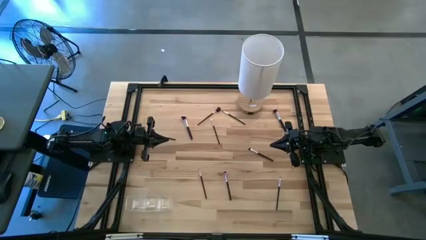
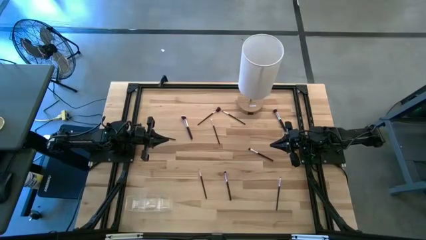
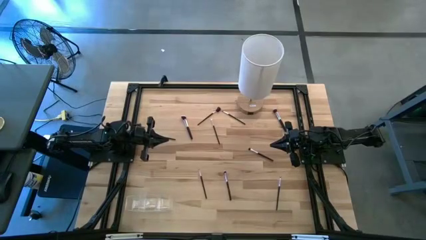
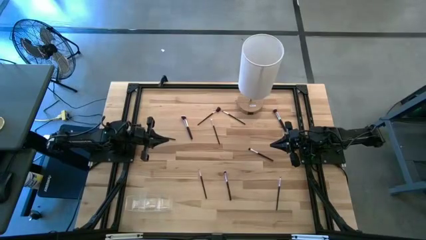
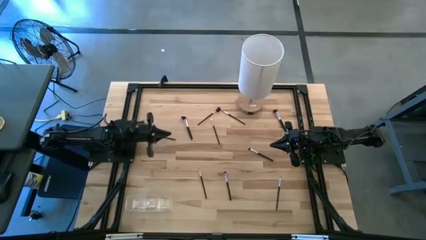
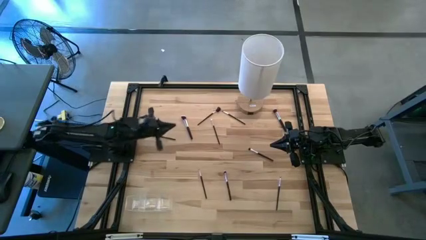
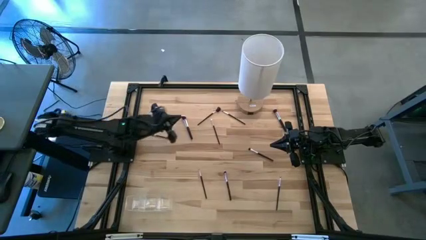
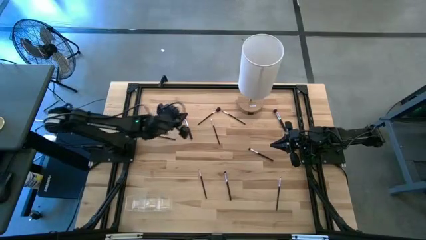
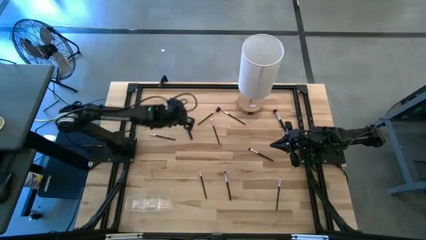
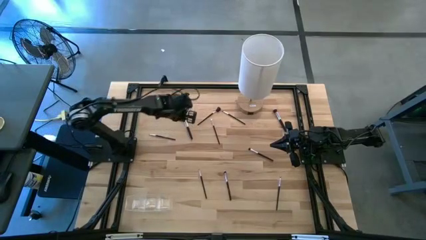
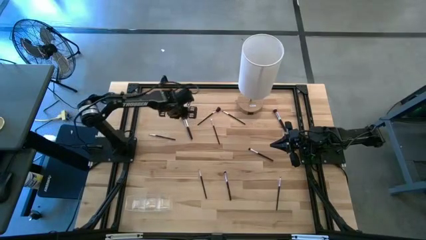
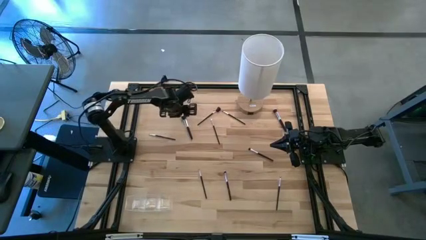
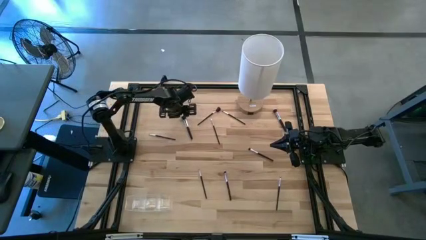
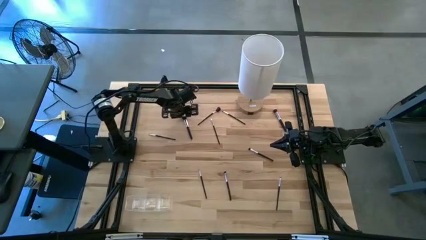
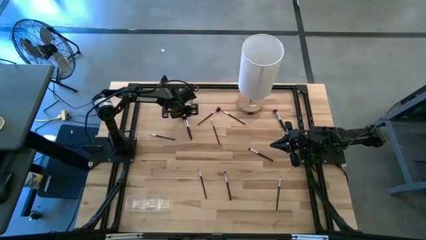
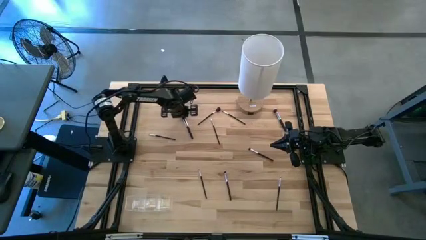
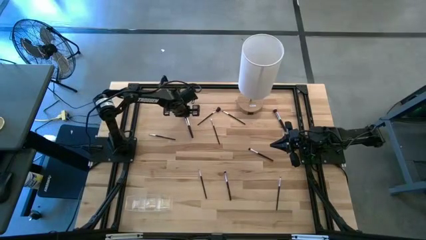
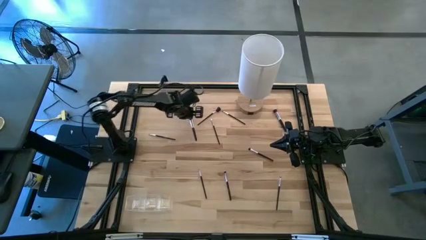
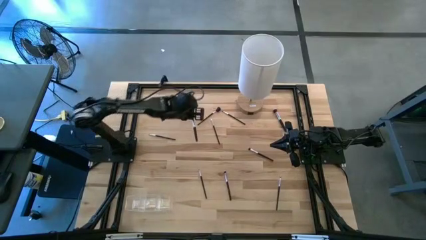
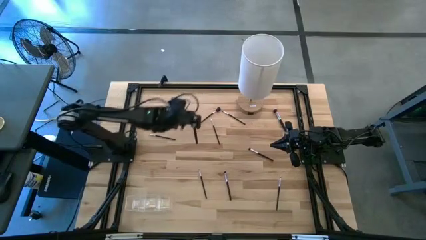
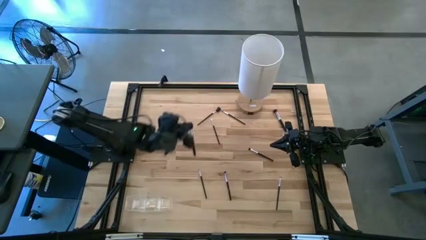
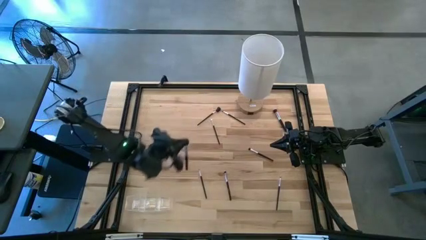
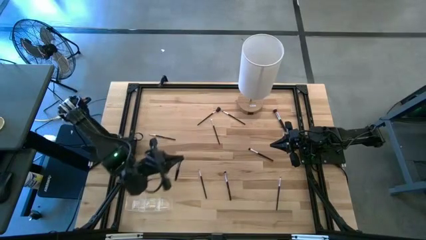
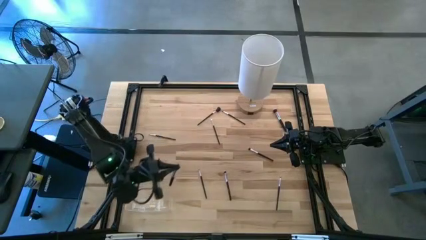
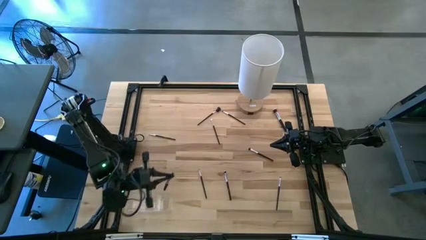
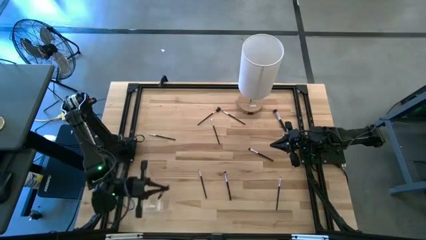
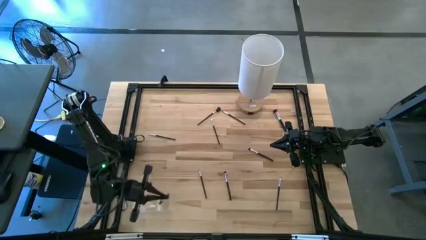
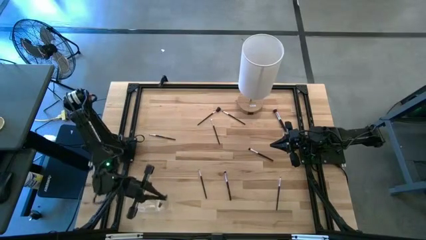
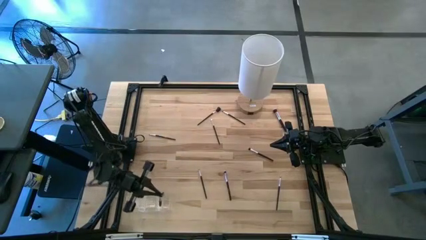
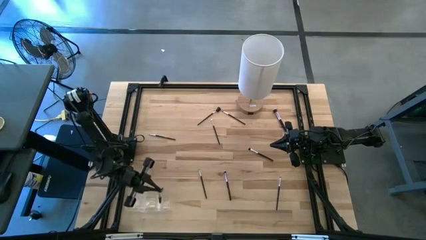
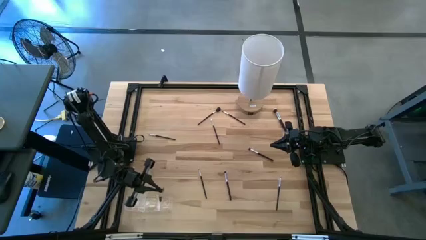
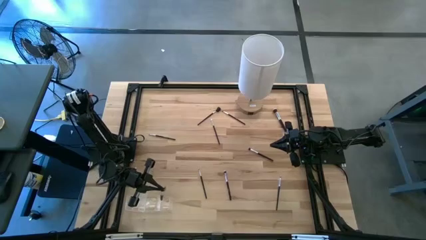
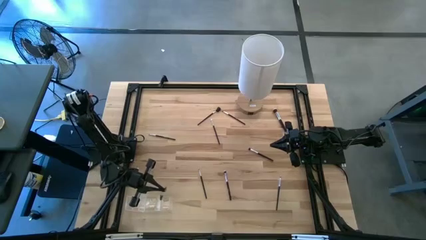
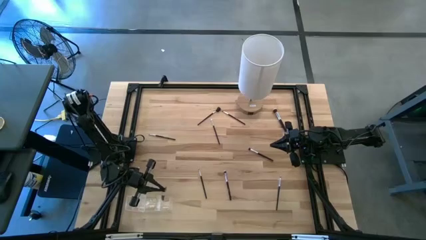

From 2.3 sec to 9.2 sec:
Task: Put items in baskets/containers
Put the black foundation brush into the transparent organizer

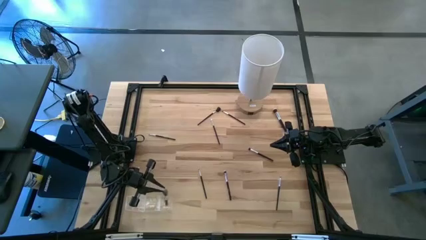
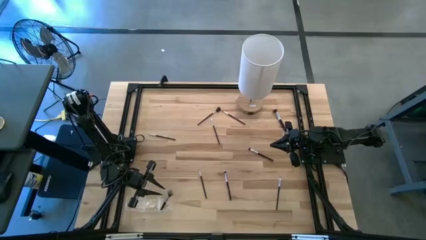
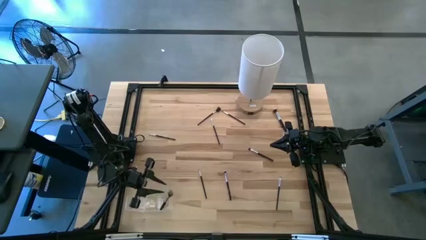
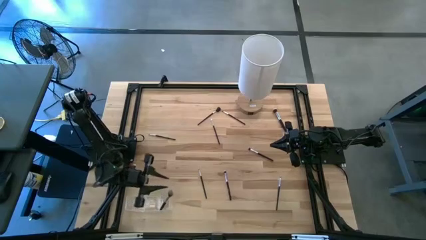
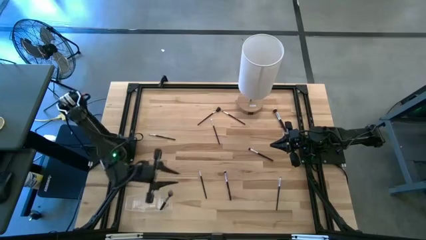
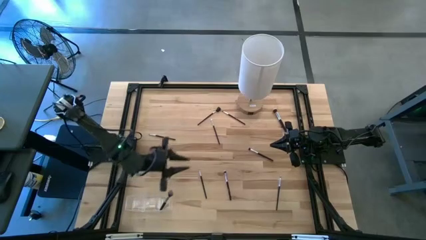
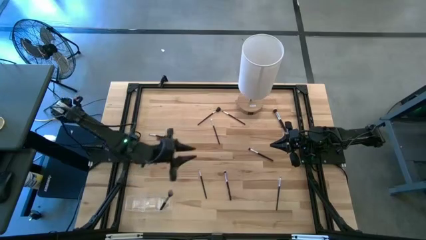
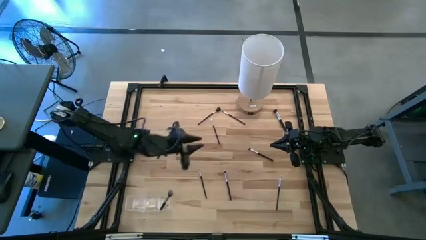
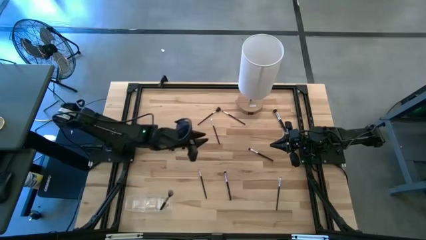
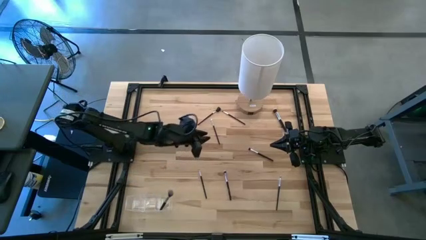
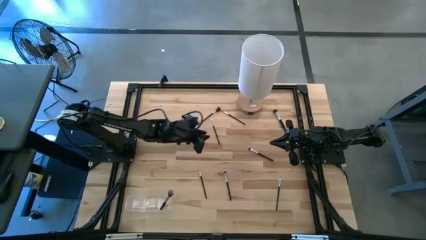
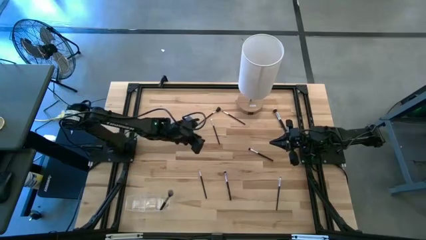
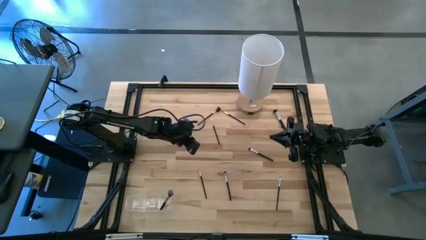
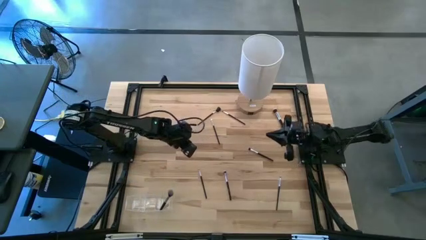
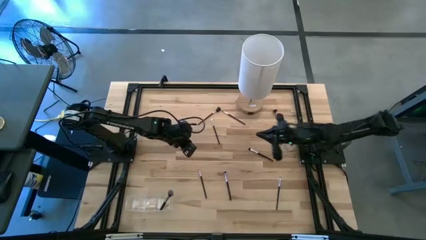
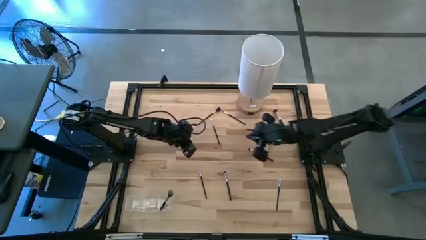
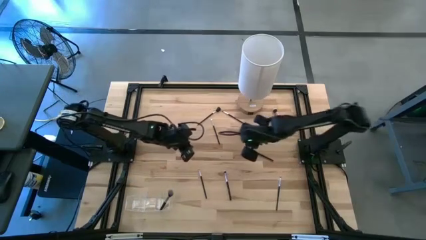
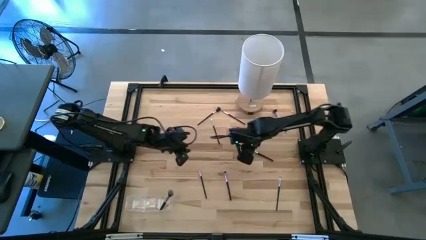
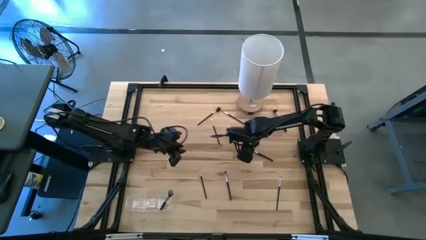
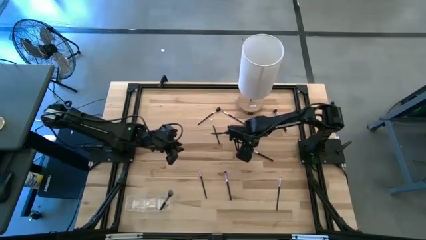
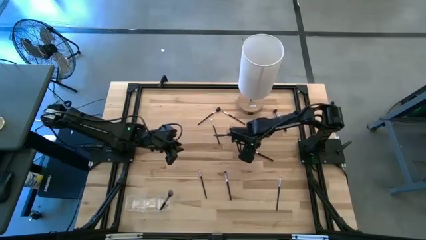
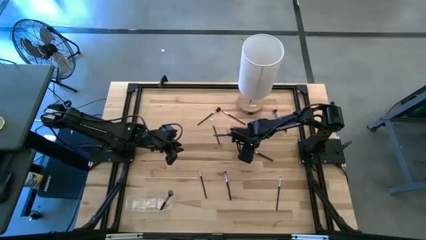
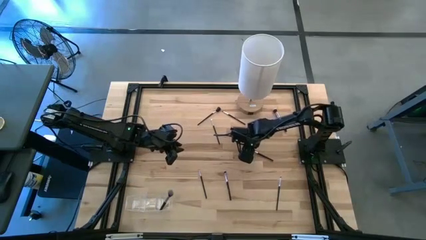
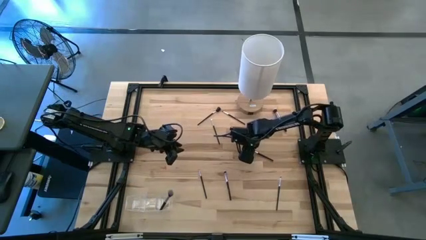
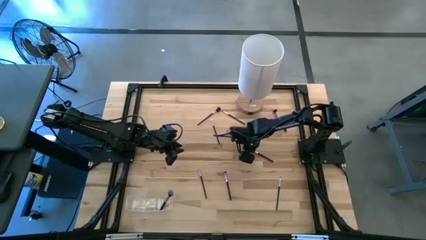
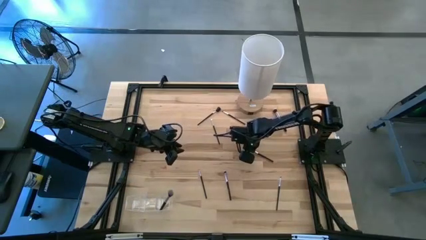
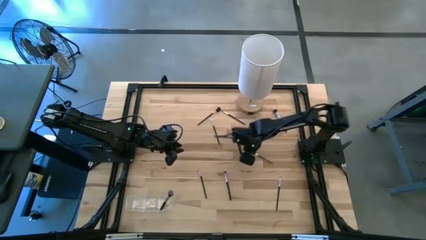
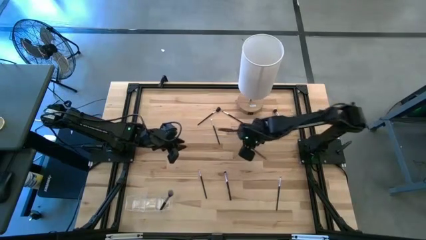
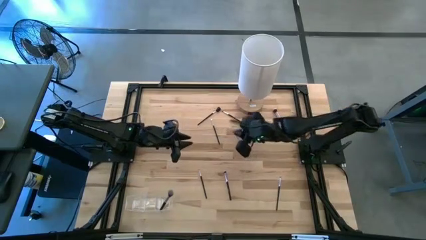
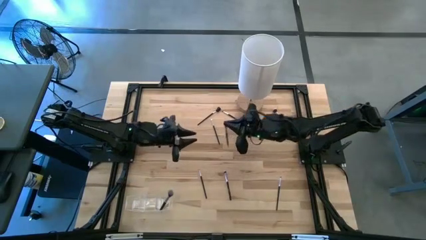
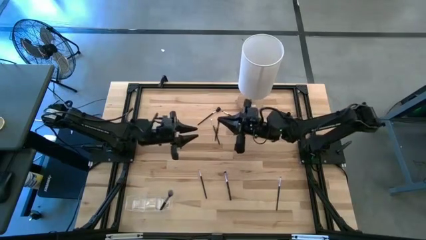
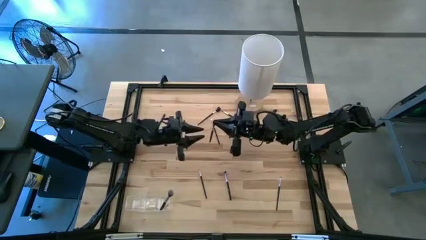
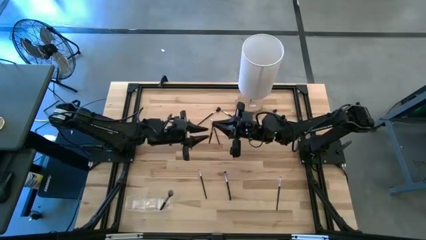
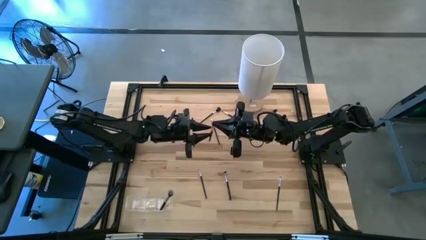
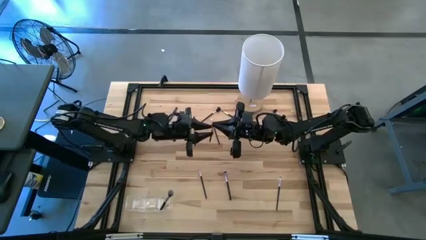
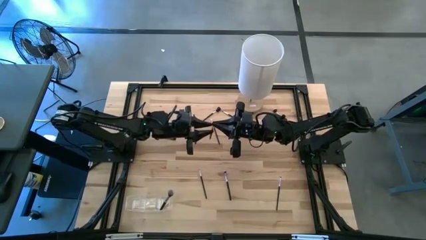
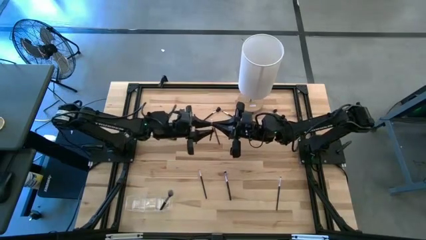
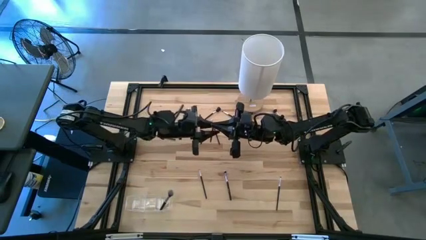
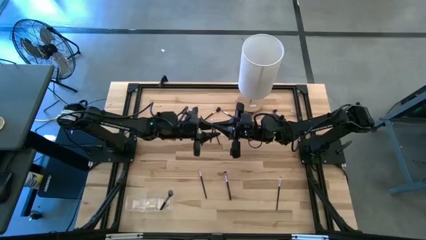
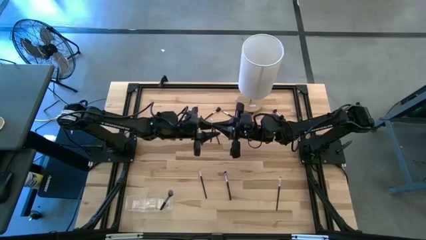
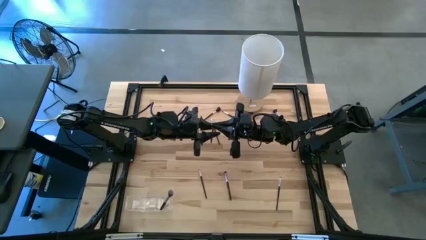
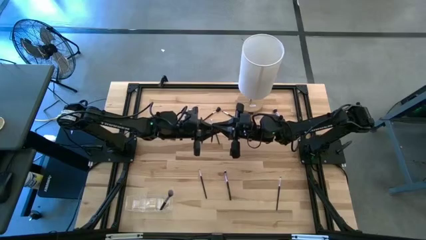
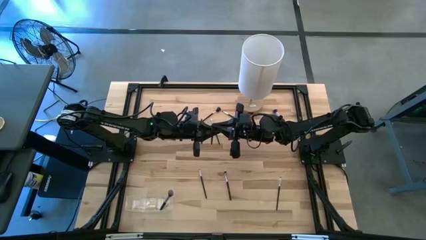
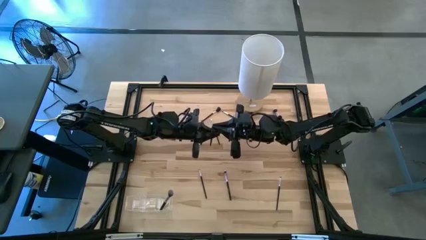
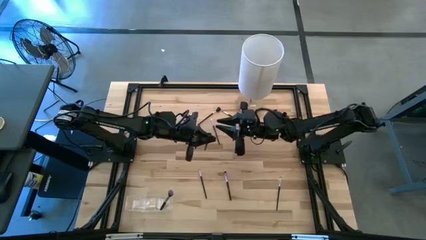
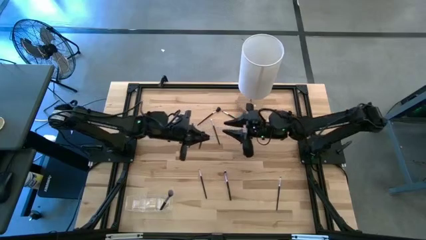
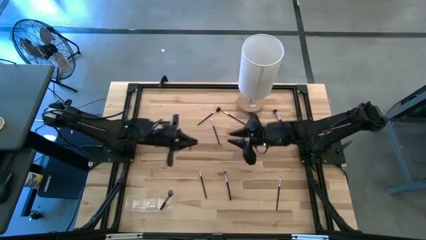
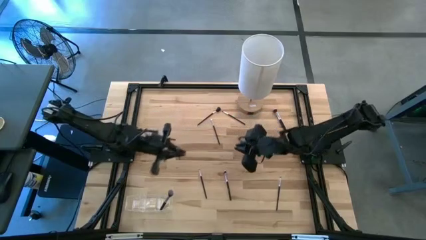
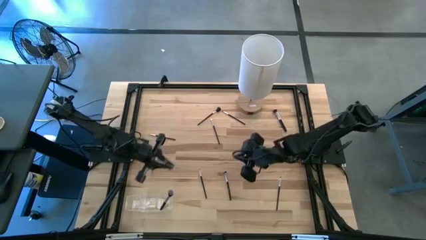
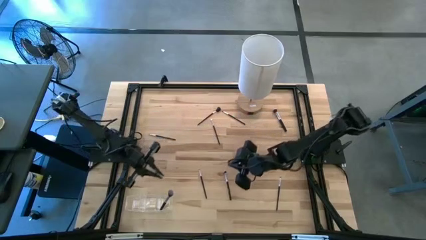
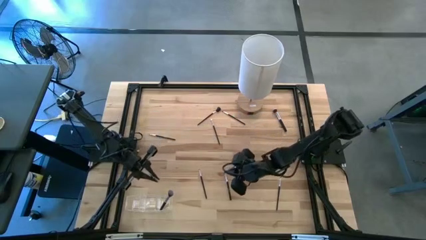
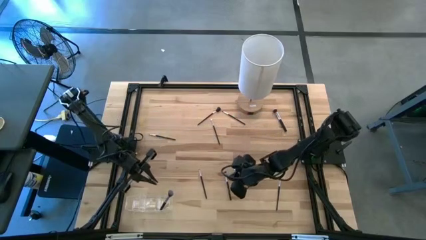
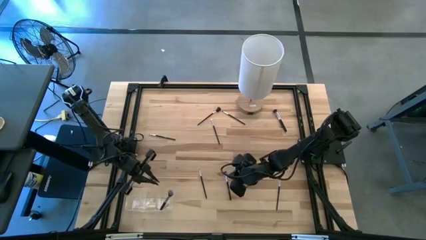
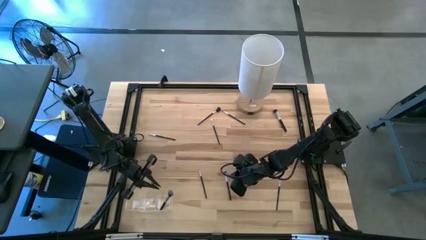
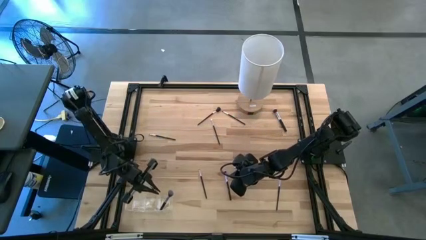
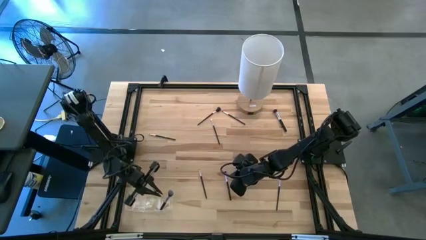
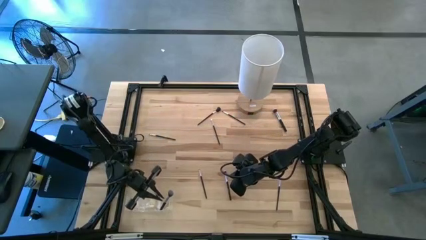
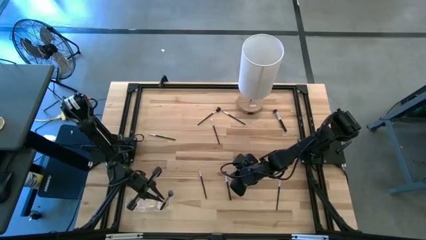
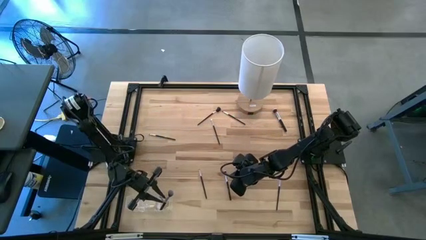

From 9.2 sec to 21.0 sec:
Put the black eyeshadow brush into the transparent organizer
